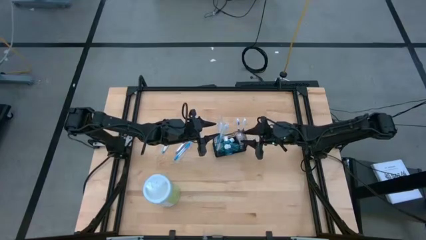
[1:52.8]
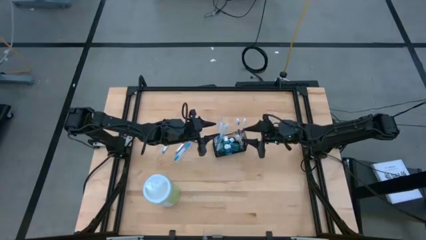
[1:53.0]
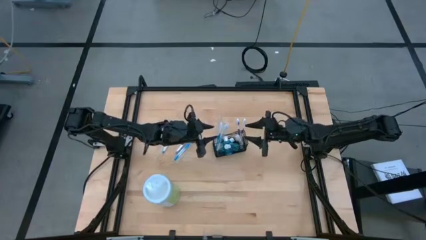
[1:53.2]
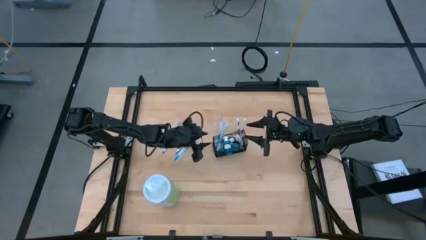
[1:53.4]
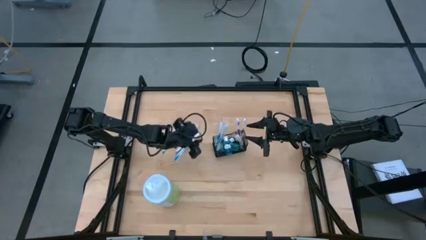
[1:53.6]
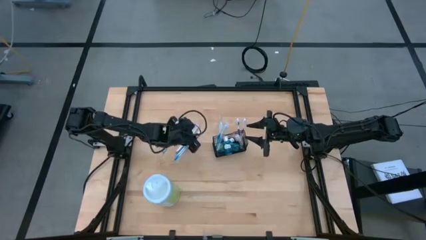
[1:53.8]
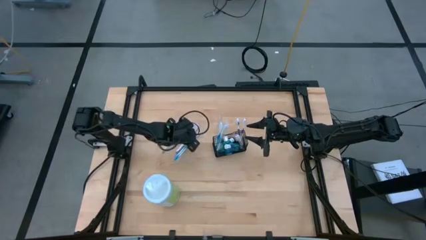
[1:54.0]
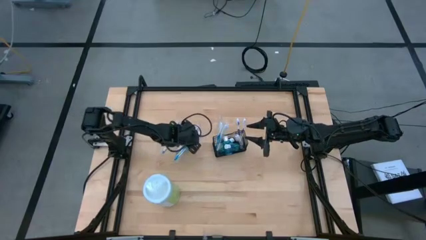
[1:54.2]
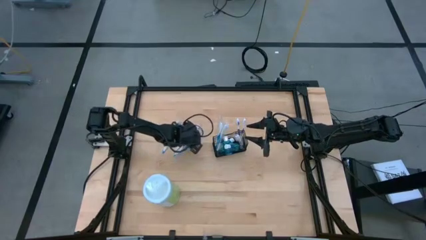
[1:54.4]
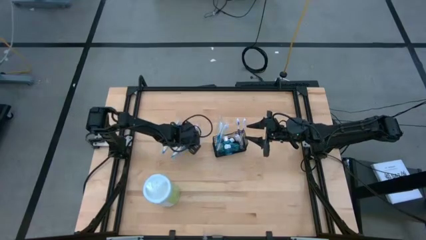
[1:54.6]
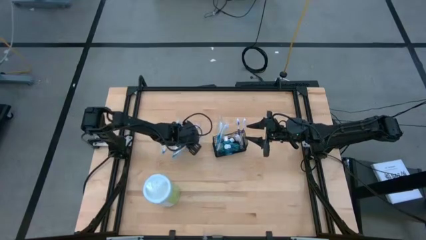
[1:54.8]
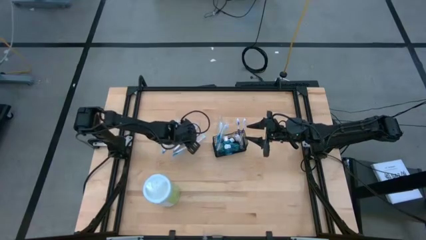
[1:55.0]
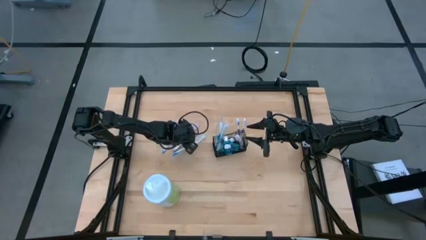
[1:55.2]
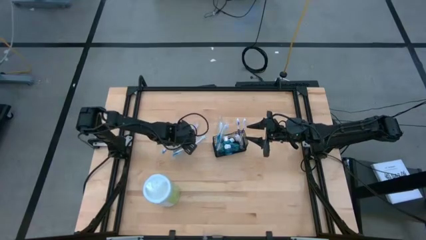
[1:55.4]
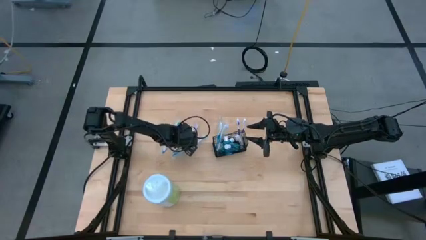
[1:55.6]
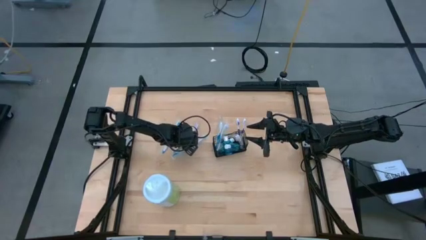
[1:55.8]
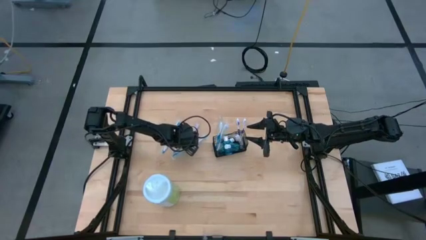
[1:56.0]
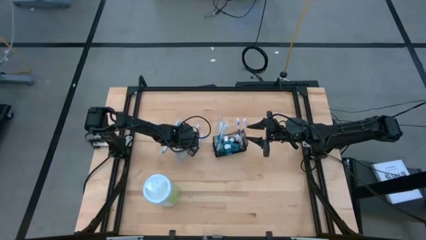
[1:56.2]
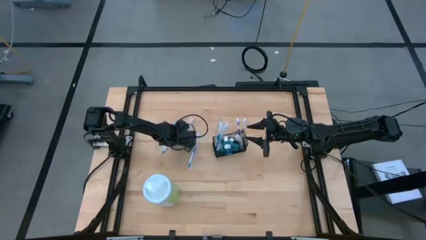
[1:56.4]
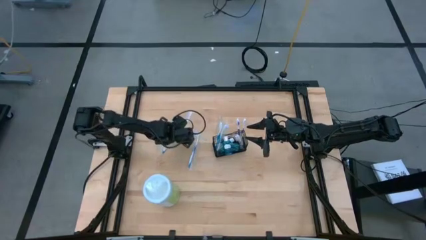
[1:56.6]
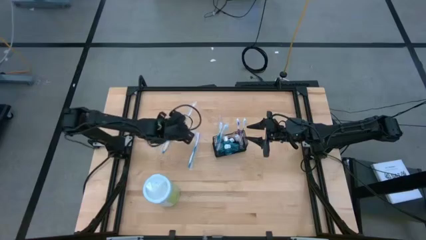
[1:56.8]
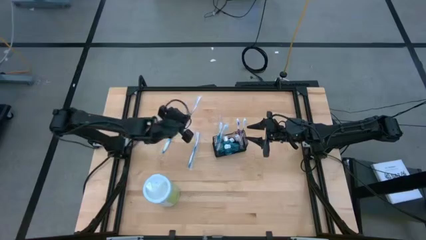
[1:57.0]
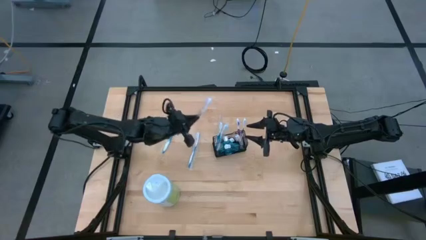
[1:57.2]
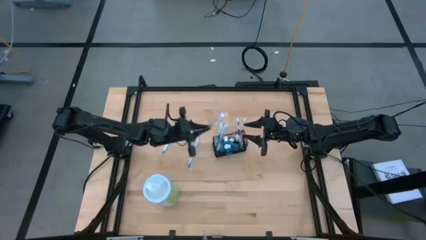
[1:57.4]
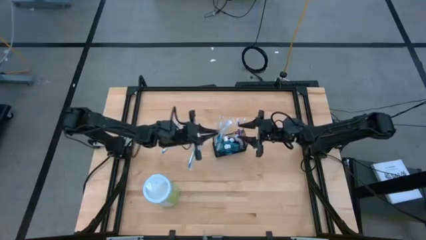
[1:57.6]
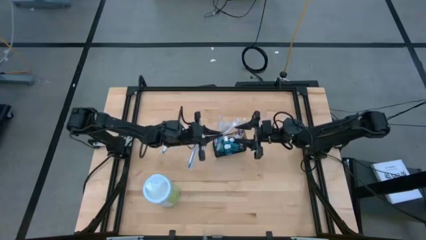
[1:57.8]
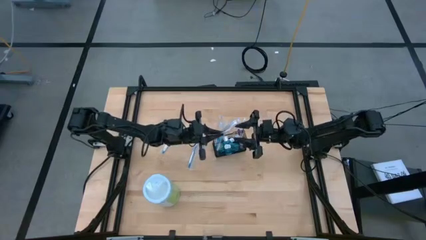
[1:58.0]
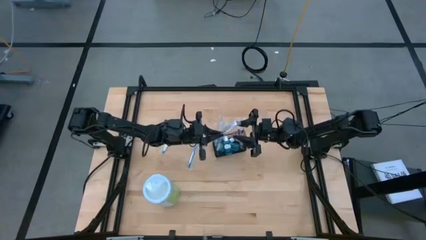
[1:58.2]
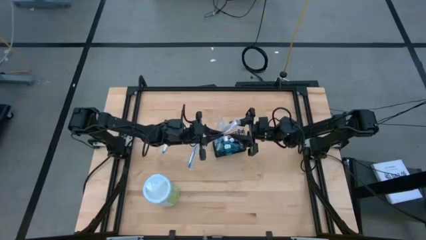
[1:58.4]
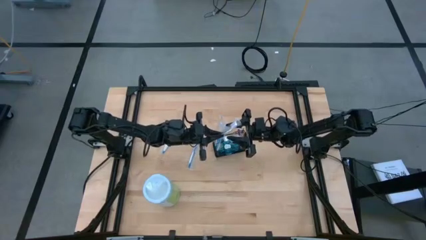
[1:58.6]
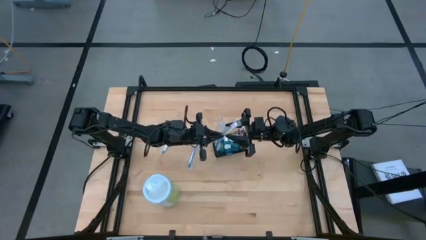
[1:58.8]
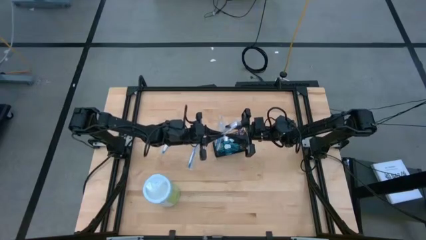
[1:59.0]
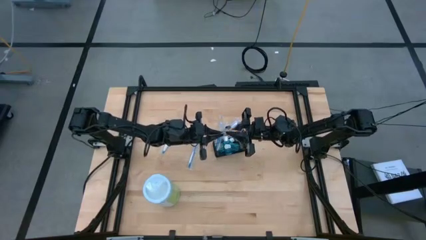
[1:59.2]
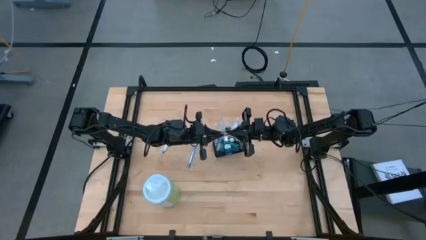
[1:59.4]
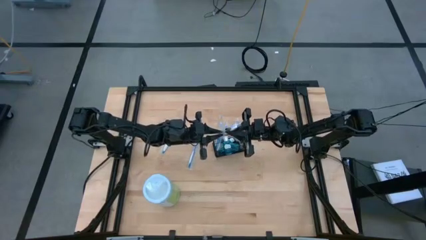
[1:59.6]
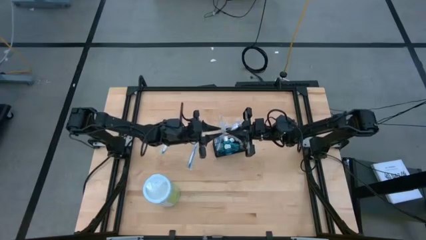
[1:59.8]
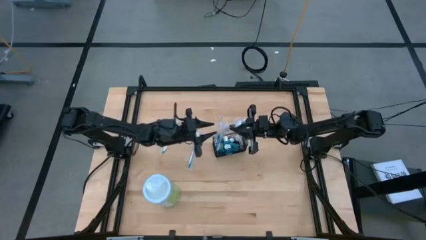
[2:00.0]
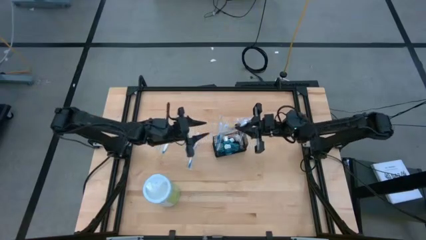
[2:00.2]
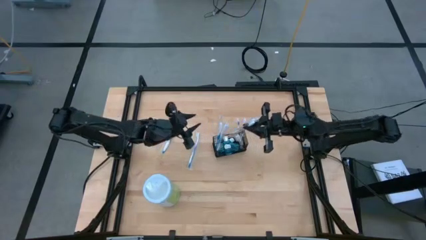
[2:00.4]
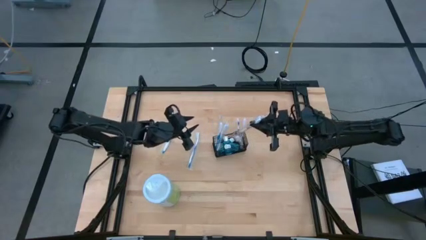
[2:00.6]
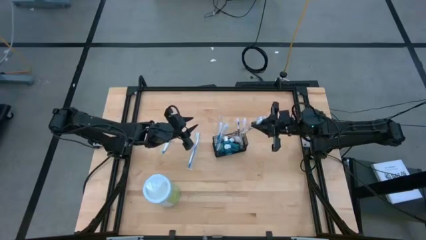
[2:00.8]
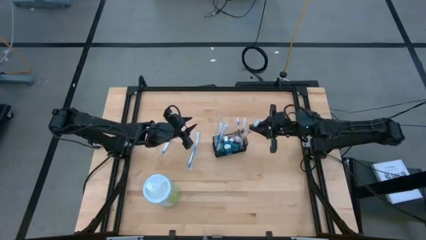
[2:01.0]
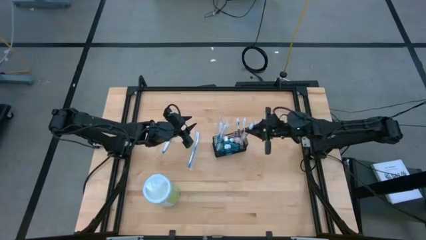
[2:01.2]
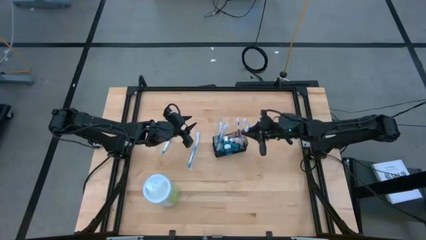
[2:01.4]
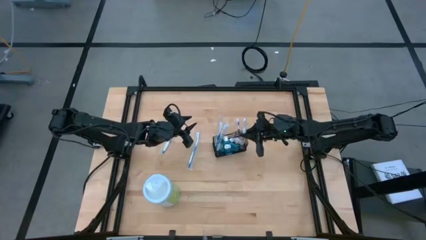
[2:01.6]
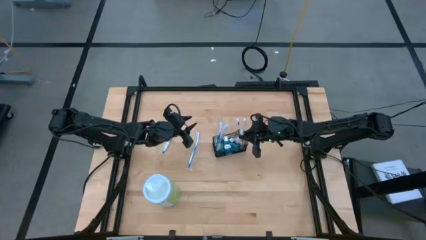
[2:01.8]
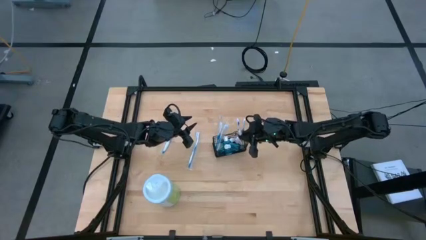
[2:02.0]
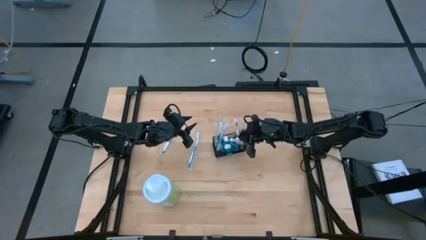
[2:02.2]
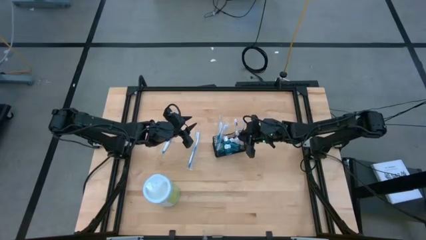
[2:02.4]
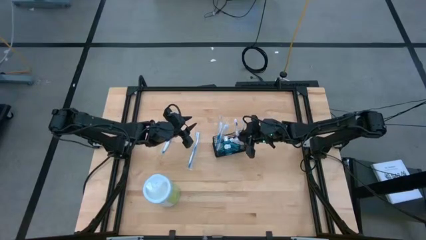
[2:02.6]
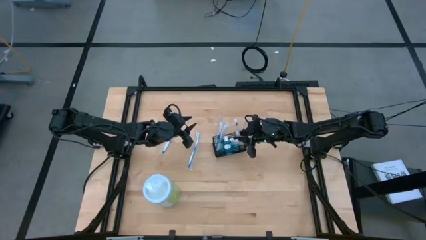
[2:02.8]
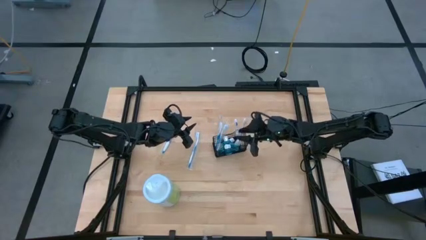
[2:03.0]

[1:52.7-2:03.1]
Task: Pick & Place toothbrushing station
Put the purple toothbrush into the black mesh organizer

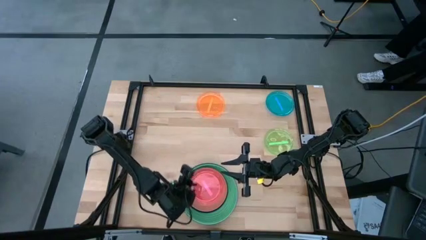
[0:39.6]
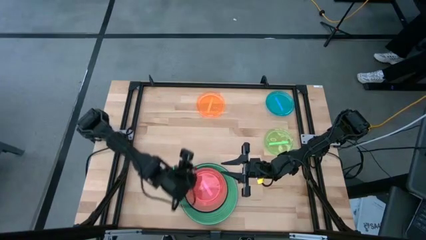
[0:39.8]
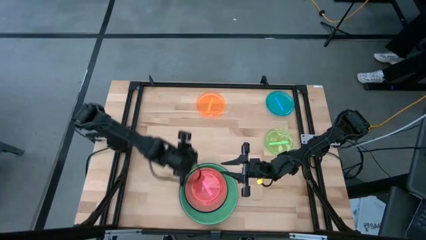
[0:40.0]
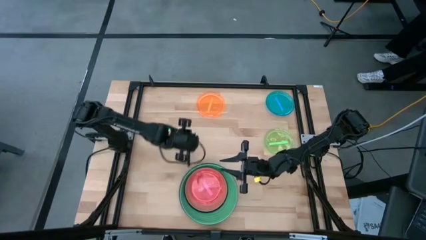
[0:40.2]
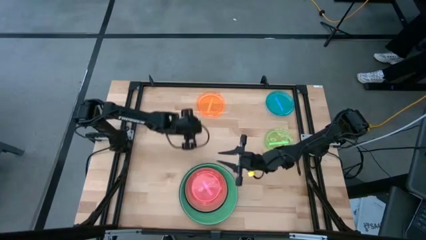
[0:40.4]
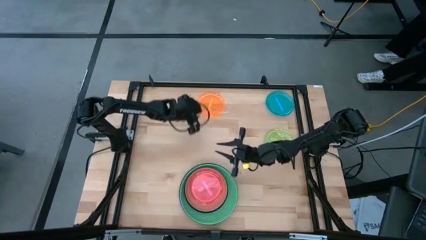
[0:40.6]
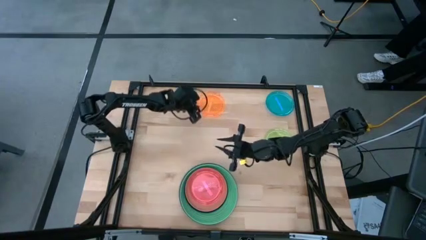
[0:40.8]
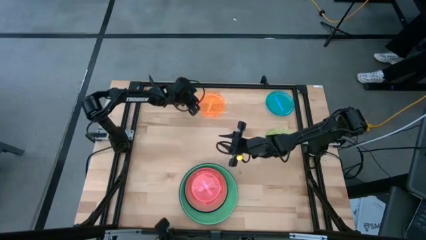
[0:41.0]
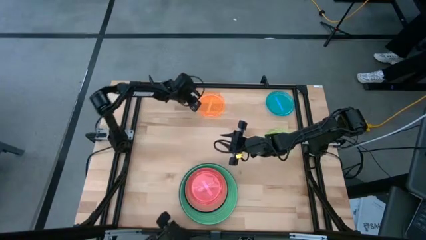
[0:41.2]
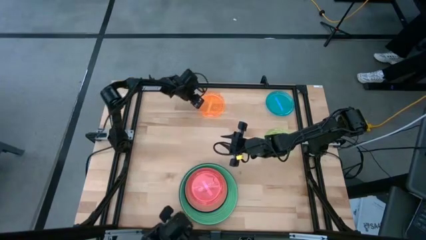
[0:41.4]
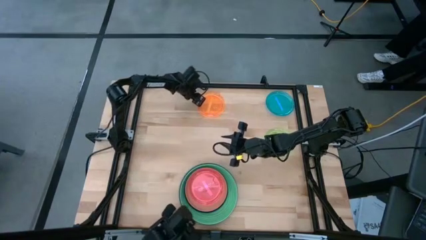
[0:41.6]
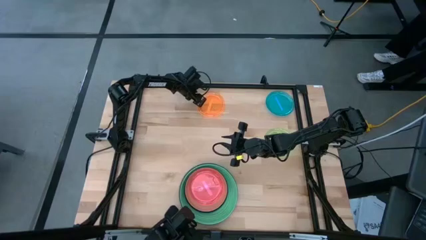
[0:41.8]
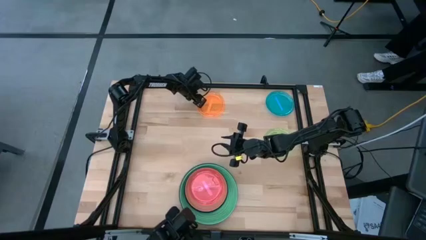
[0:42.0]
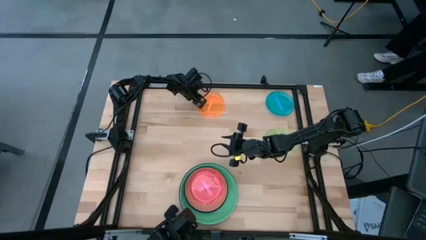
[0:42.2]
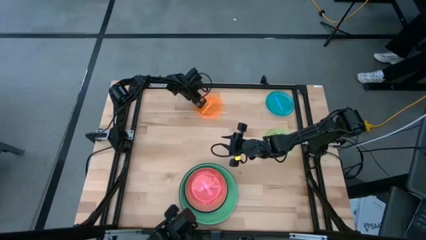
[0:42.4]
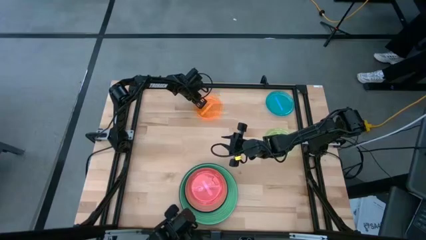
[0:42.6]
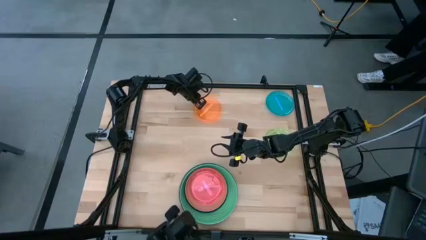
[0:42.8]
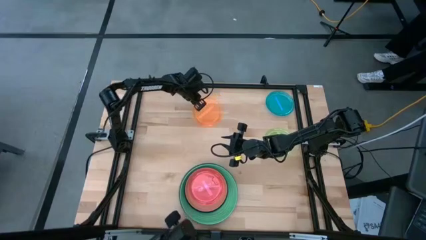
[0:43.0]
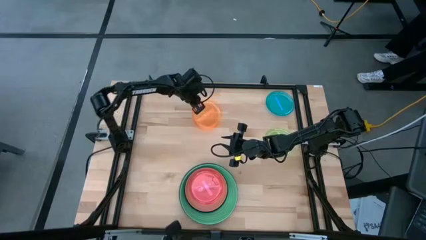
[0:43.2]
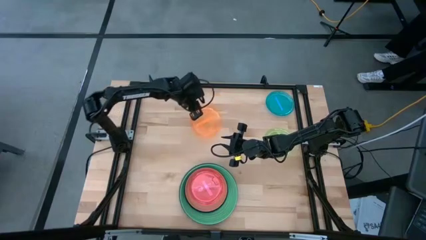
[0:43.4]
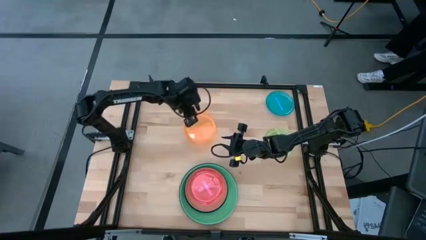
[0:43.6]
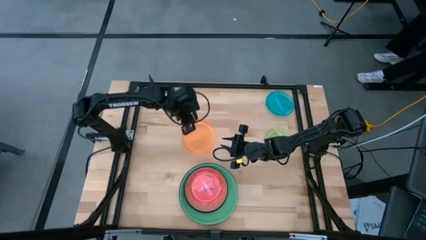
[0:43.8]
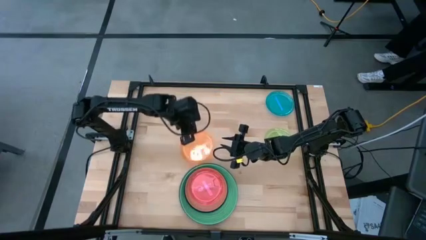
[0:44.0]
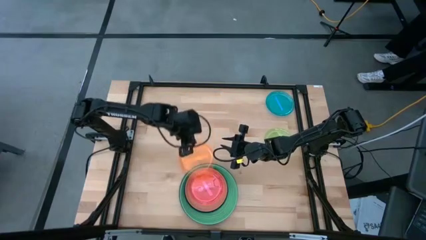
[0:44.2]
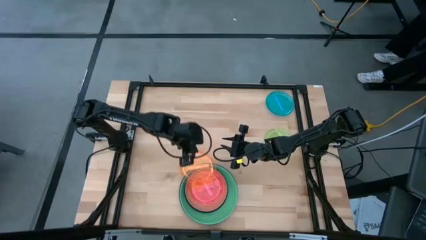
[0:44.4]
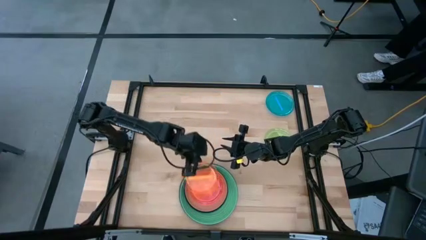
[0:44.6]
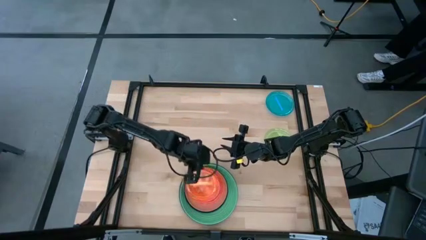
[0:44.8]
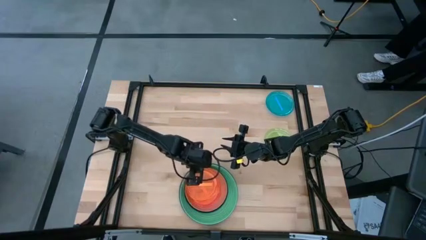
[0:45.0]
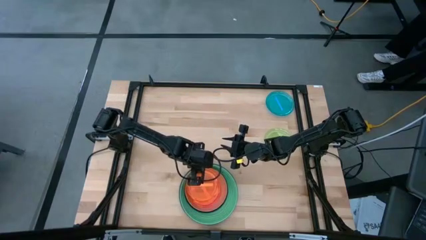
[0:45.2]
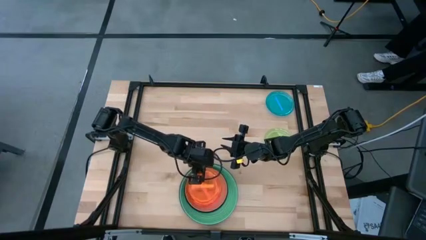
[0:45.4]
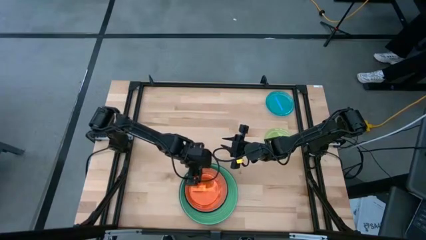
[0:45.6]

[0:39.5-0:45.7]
Task: Stack plastic plates
Stack the orange plate on top of the pink plate
